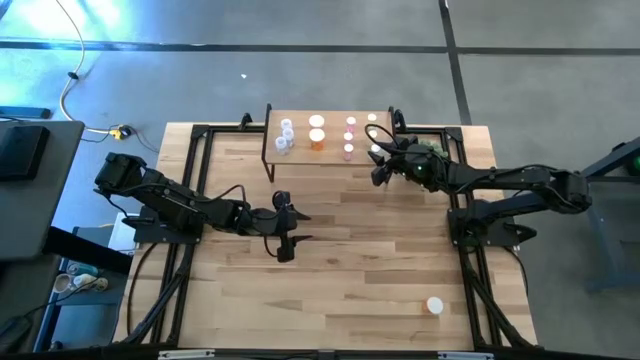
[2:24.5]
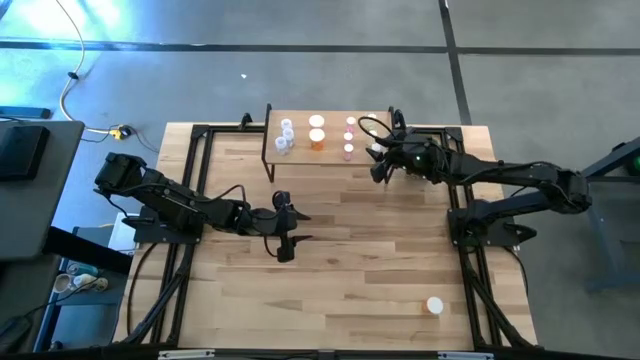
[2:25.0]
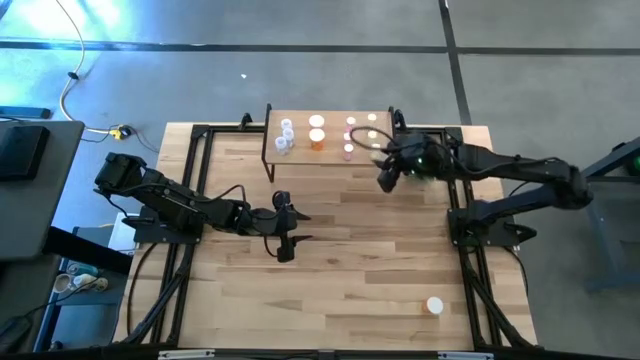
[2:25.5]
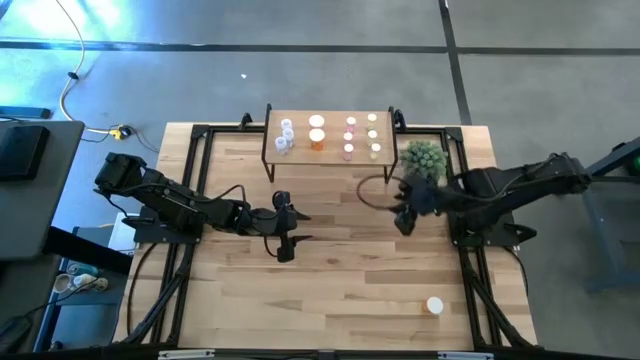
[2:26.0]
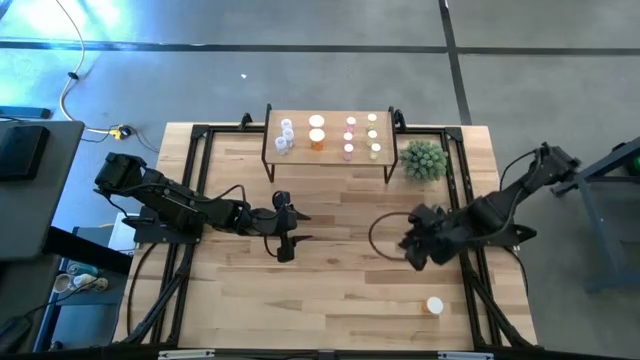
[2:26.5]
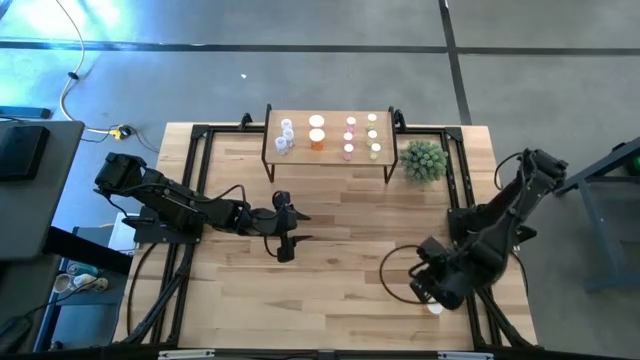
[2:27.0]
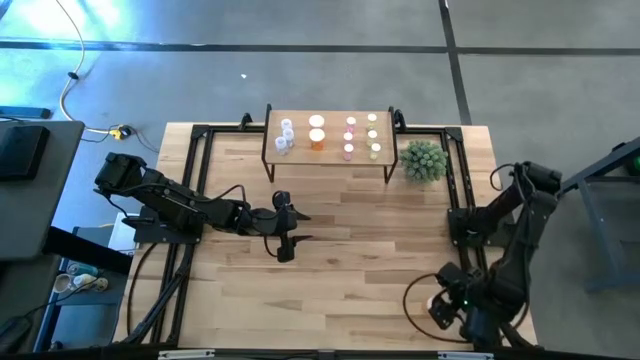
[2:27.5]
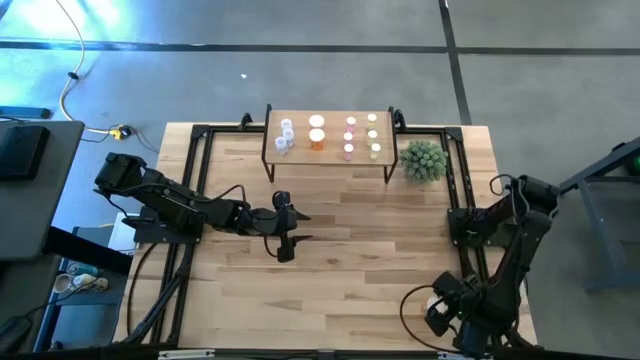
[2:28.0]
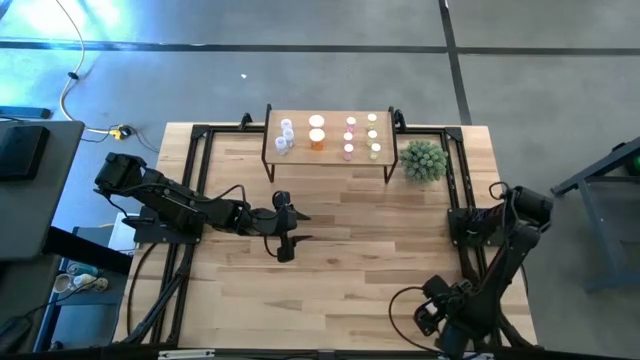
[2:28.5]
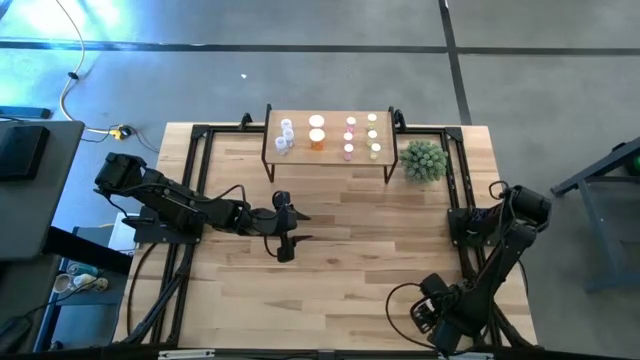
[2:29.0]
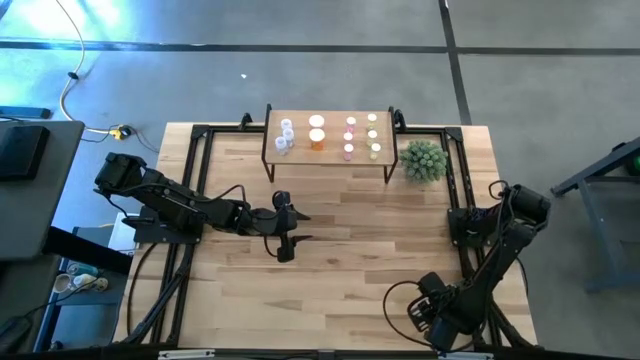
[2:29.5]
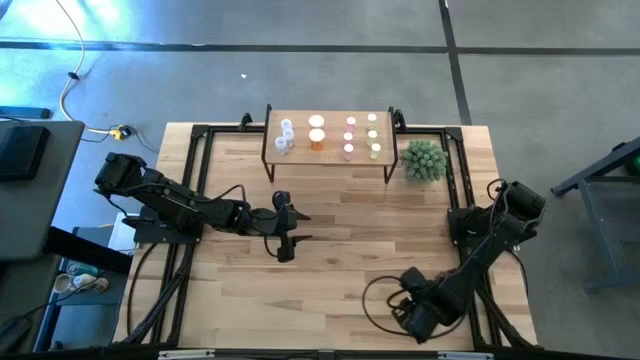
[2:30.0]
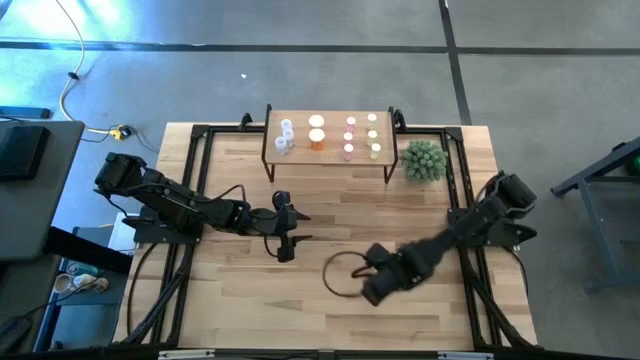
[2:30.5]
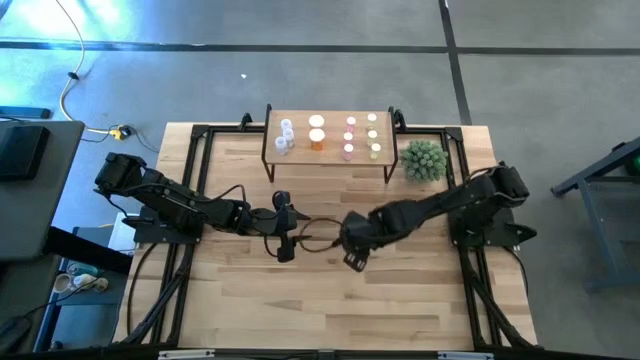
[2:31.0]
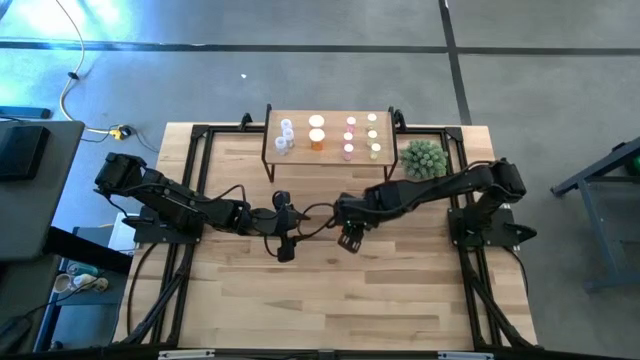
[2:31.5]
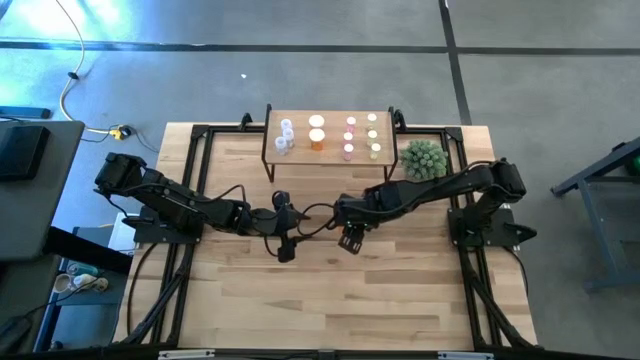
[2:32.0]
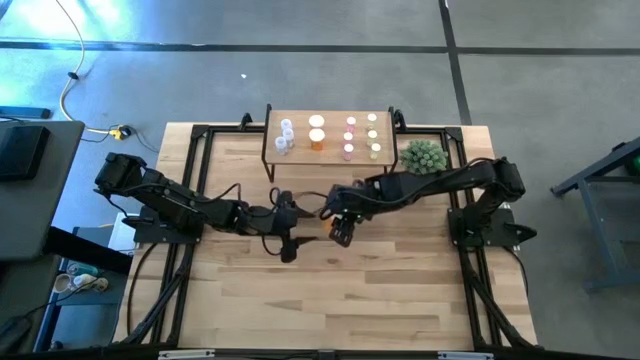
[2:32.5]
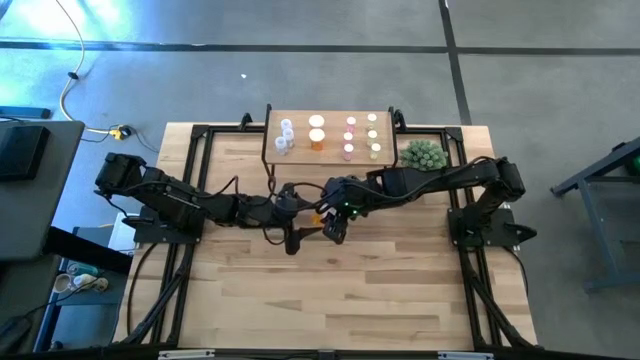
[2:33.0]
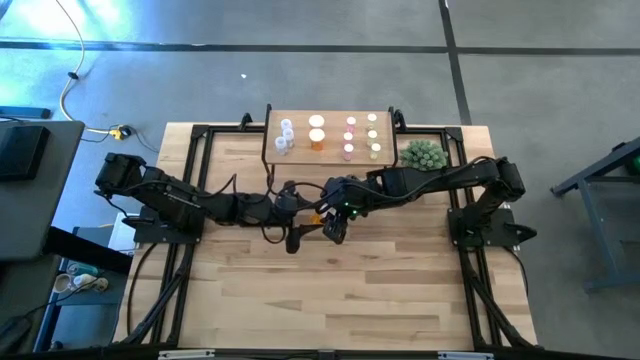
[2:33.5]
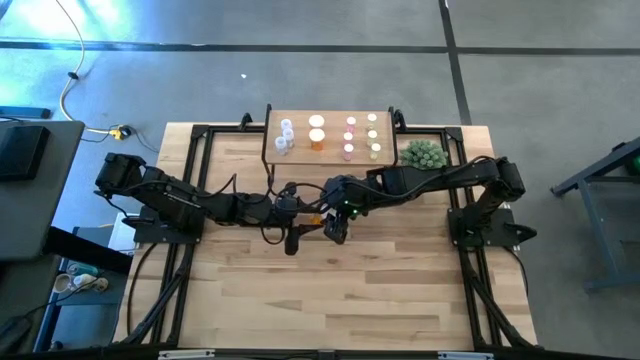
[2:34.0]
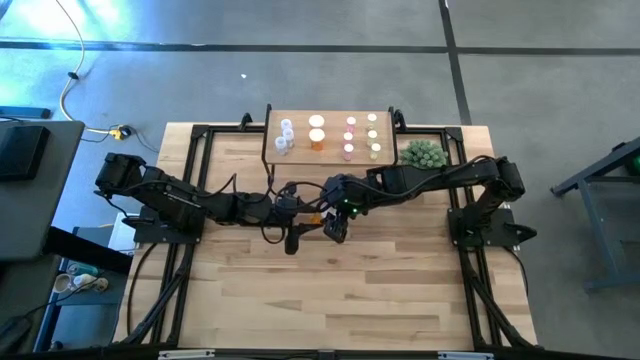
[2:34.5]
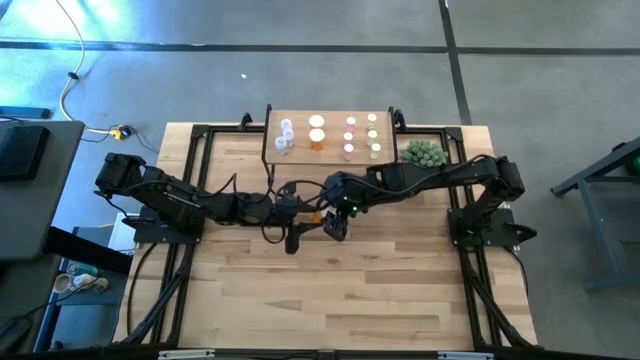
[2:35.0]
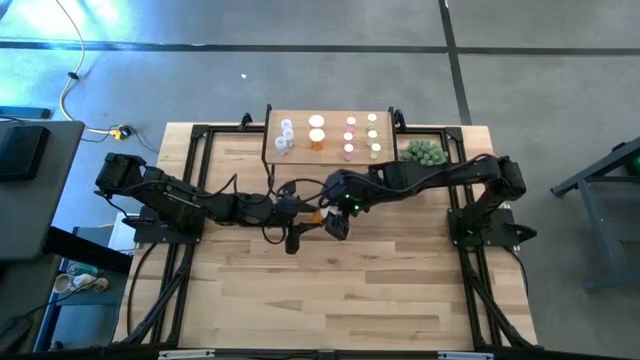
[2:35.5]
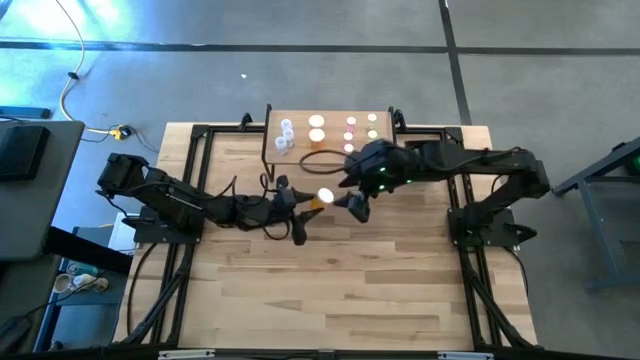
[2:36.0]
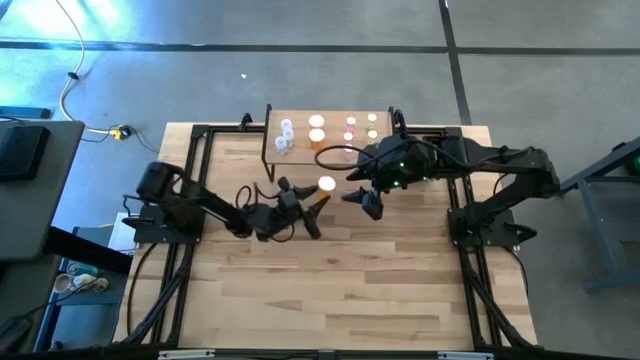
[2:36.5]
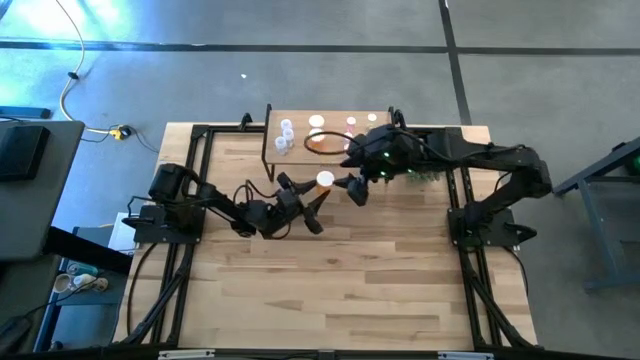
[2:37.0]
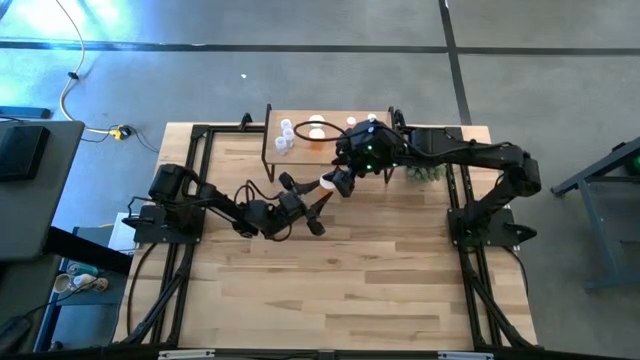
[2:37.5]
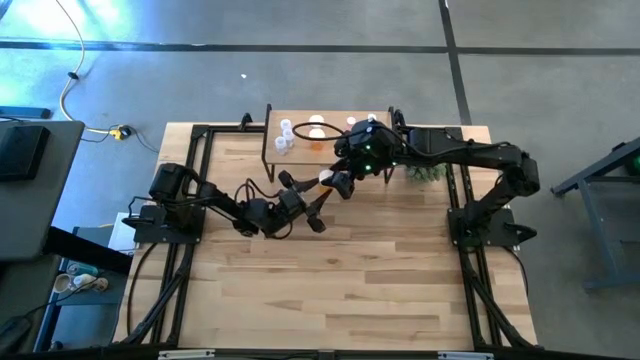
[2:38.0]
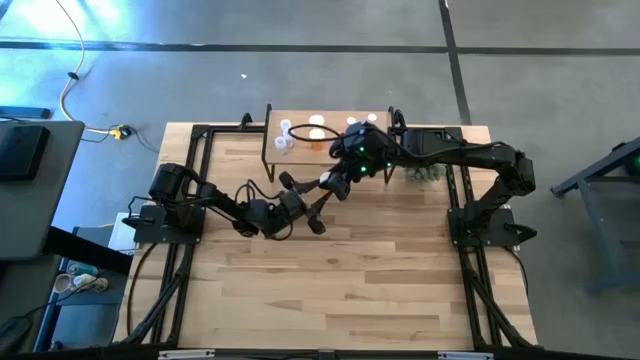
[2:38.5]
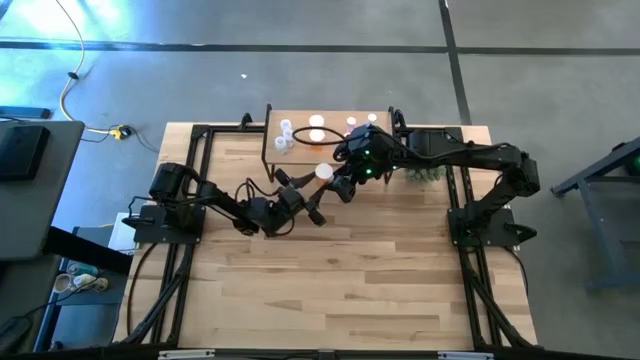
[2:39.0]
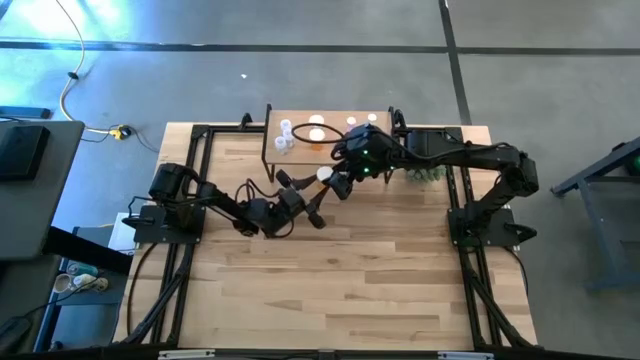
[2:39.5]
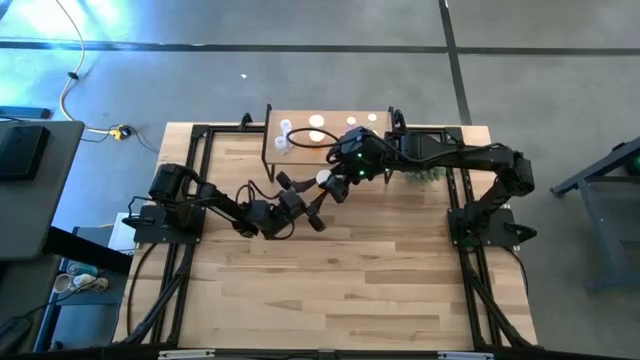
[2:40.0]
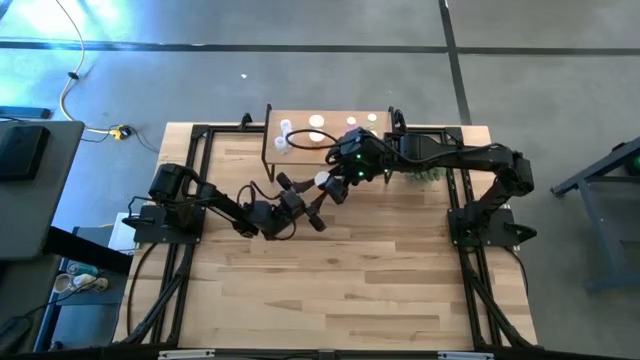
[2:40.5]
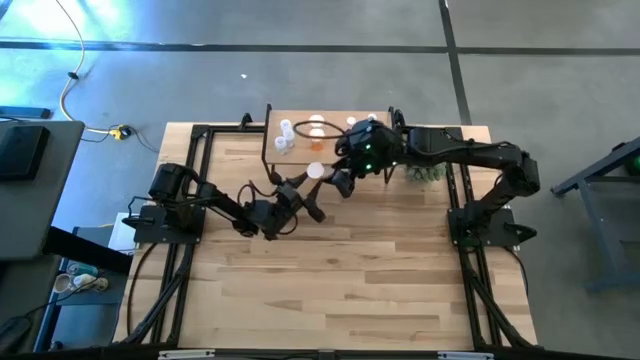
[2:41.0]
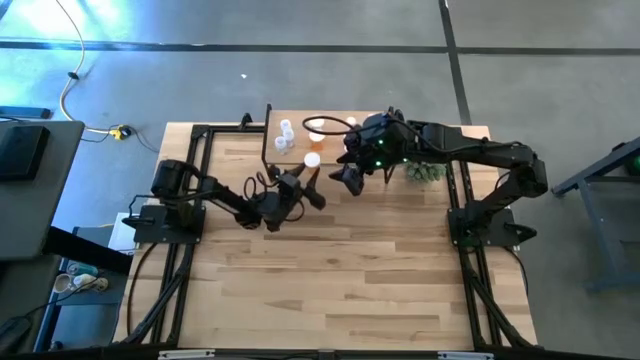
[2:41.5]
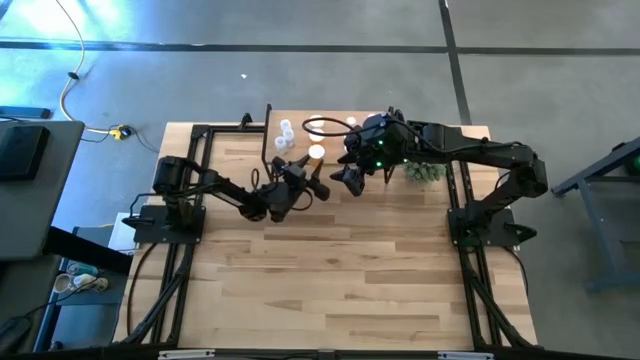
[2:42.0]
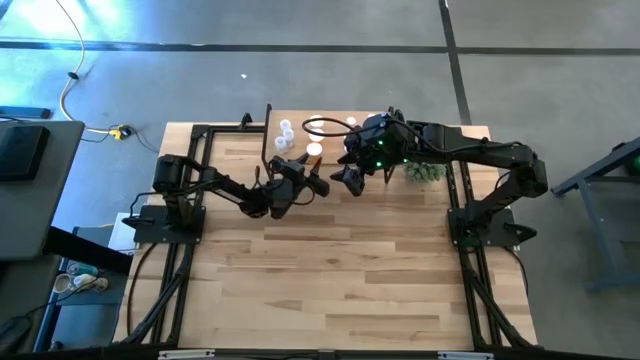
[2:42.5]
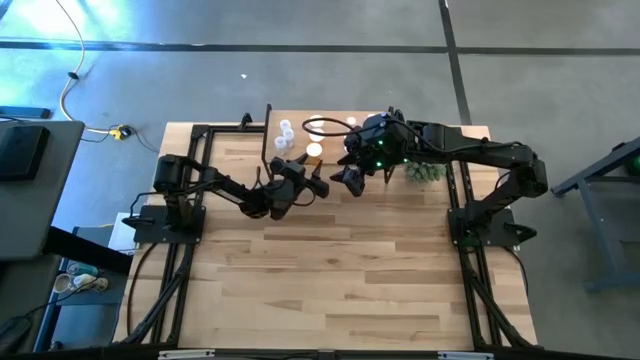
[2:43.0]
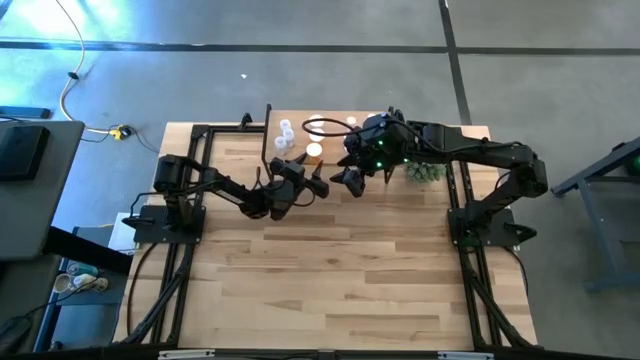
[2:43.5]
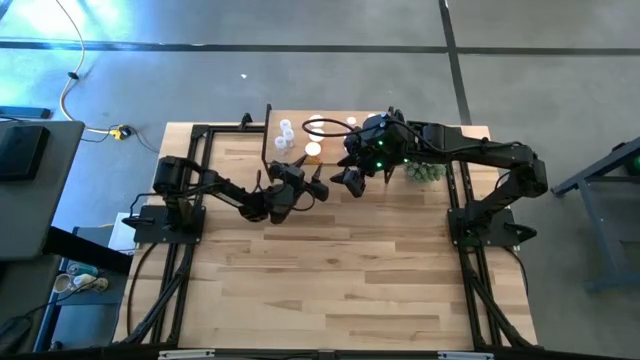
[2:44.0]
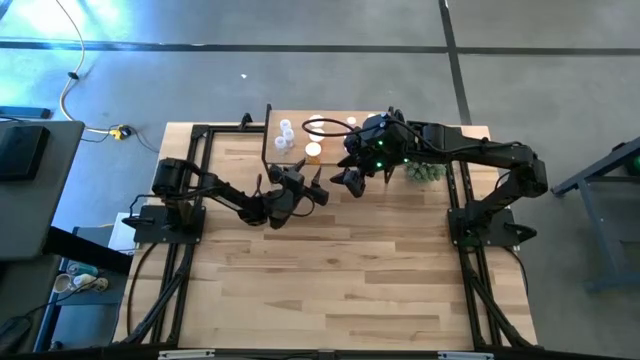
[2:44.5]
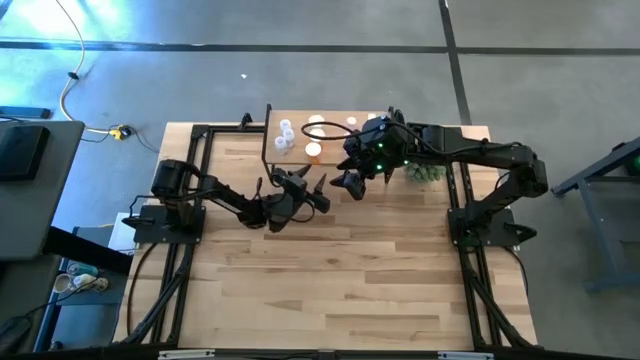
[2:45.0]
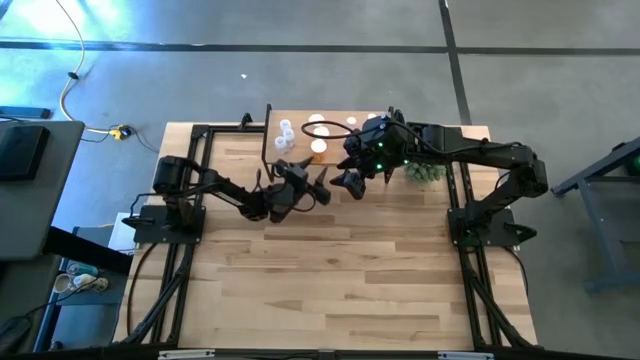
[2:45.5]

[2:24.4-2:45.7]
Task: Pick and place medicine bottles onto shelf by color
Put the orange pill bottle aligned with the other orange pill bottles on the shelf
